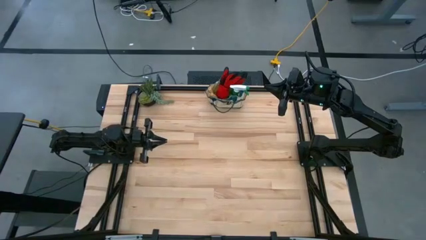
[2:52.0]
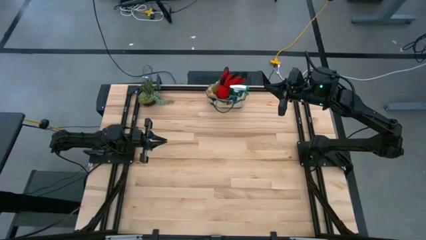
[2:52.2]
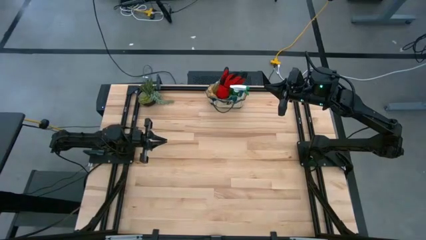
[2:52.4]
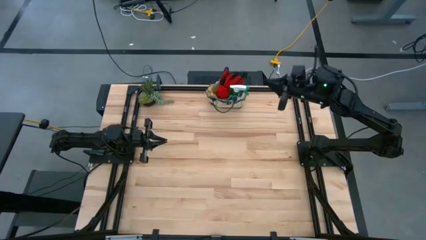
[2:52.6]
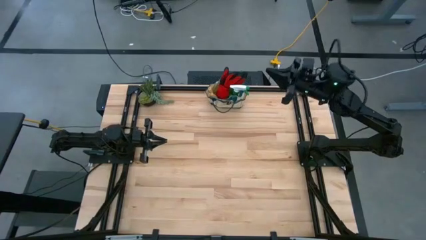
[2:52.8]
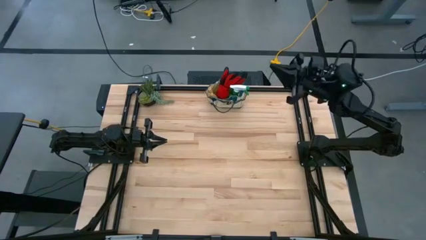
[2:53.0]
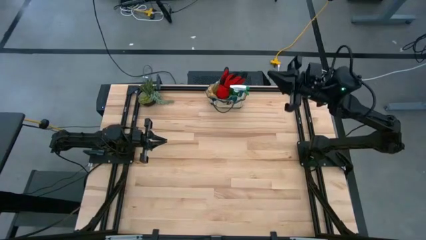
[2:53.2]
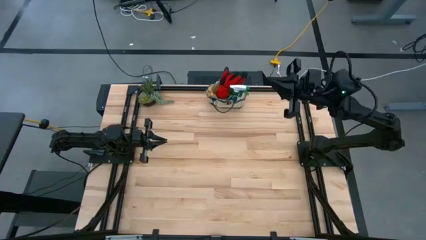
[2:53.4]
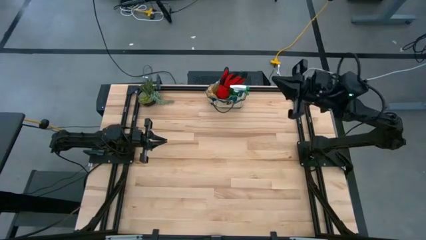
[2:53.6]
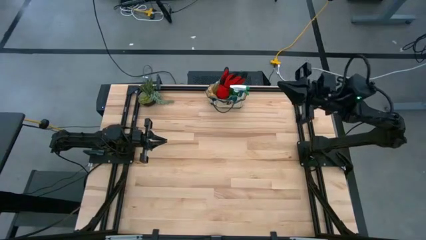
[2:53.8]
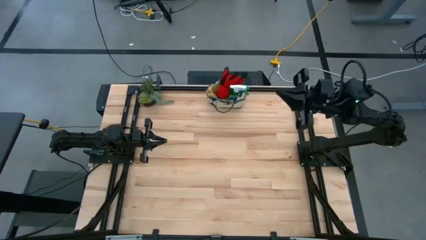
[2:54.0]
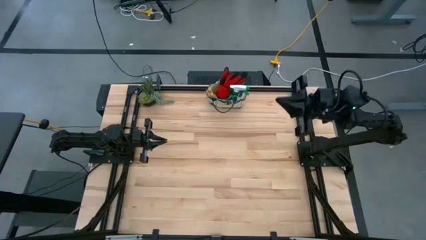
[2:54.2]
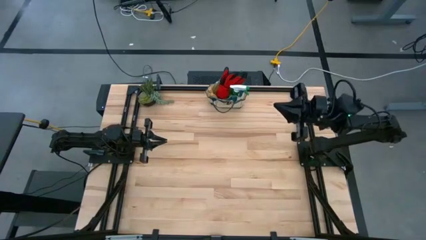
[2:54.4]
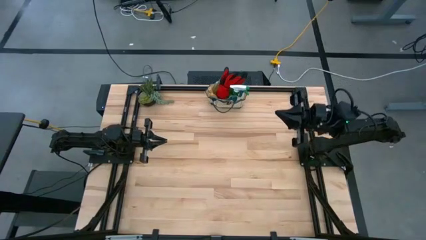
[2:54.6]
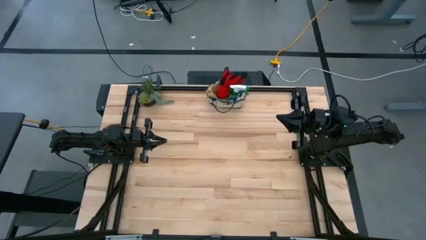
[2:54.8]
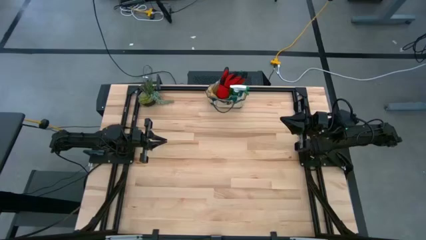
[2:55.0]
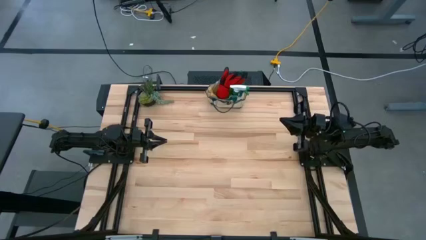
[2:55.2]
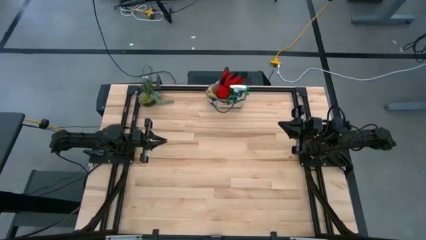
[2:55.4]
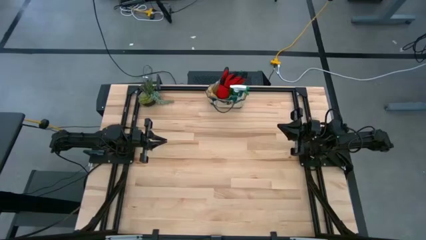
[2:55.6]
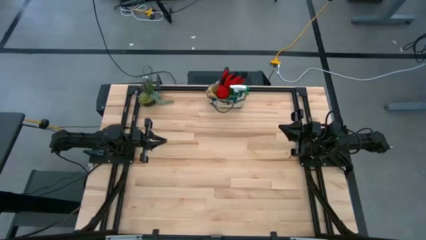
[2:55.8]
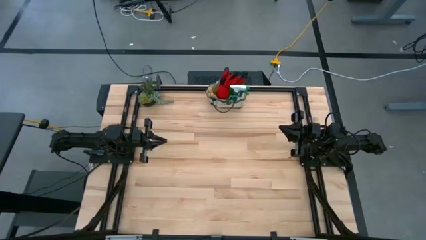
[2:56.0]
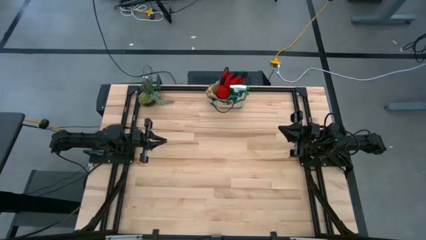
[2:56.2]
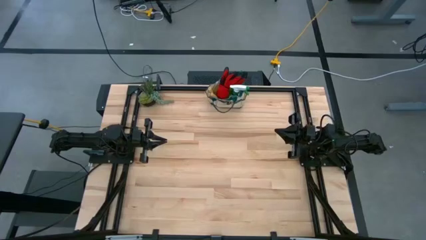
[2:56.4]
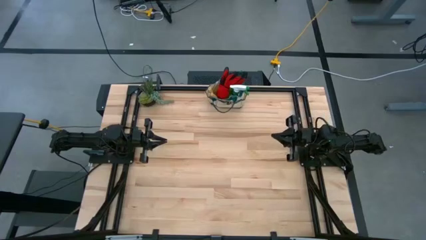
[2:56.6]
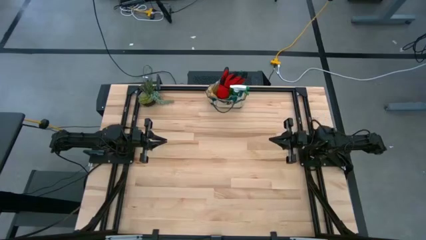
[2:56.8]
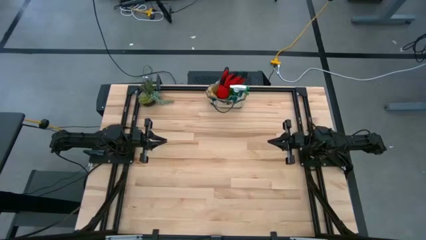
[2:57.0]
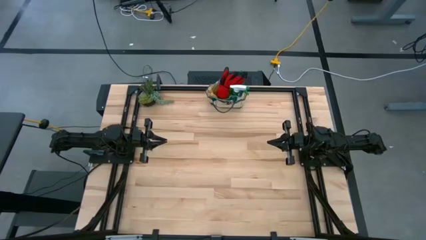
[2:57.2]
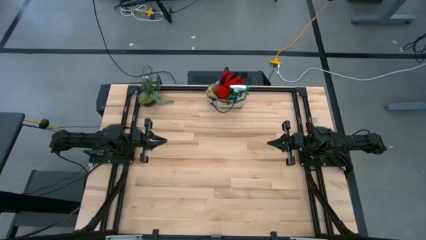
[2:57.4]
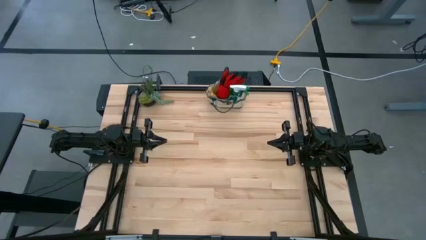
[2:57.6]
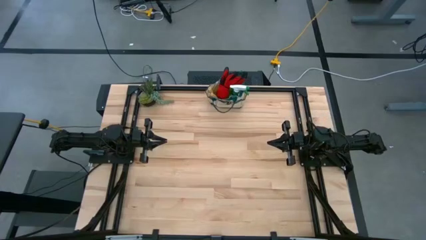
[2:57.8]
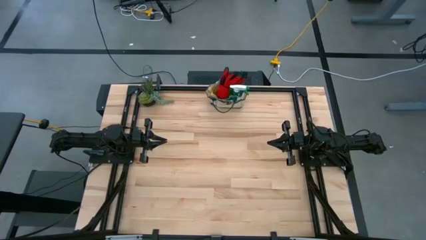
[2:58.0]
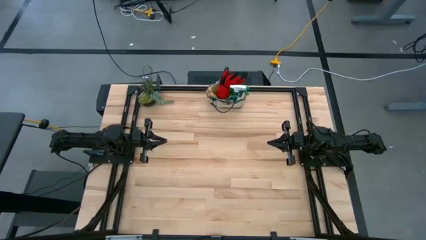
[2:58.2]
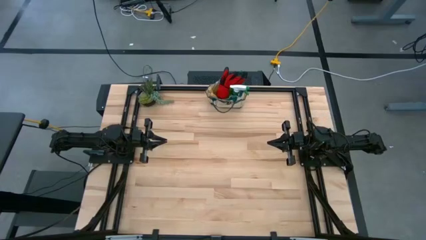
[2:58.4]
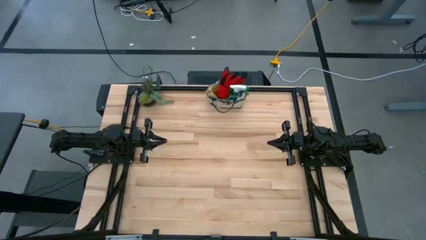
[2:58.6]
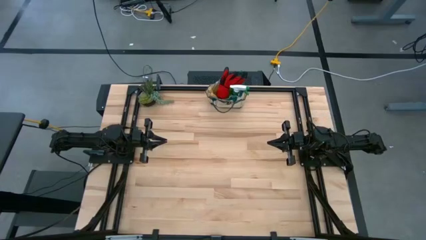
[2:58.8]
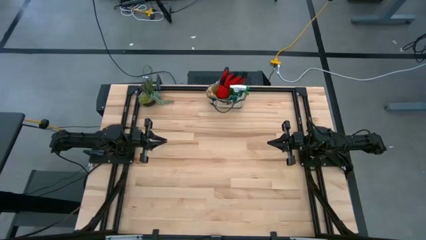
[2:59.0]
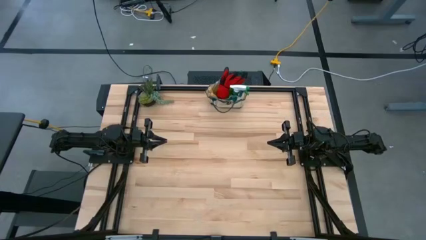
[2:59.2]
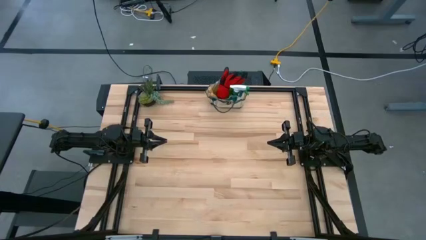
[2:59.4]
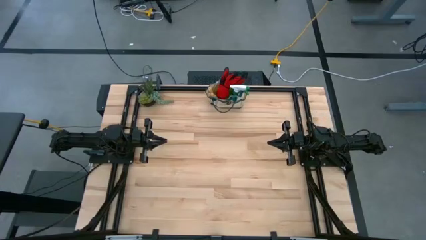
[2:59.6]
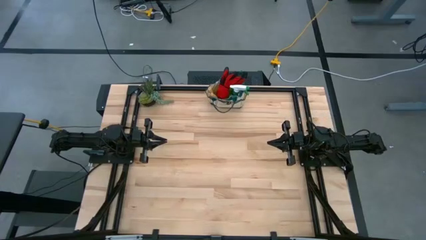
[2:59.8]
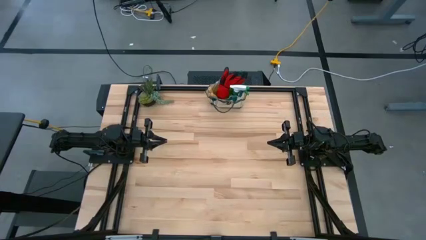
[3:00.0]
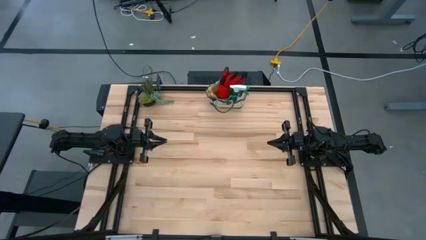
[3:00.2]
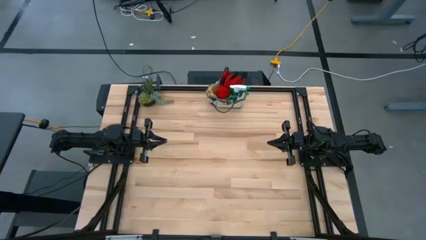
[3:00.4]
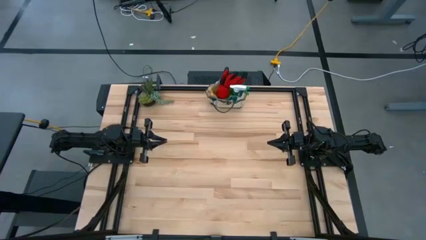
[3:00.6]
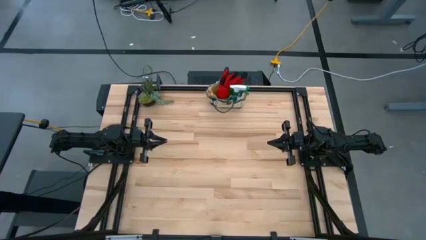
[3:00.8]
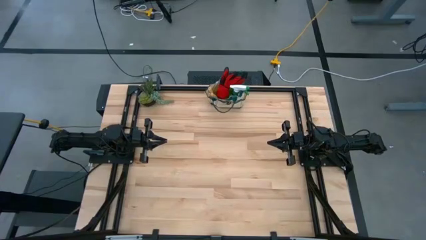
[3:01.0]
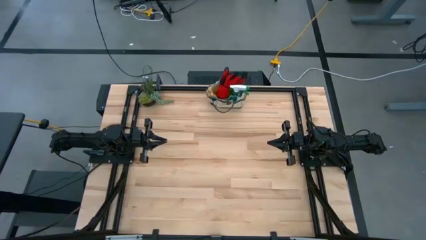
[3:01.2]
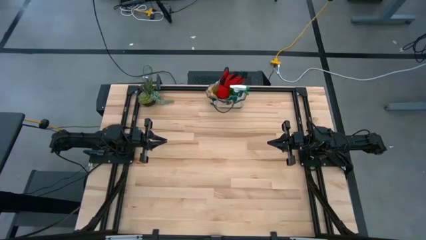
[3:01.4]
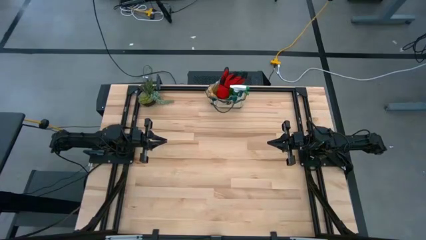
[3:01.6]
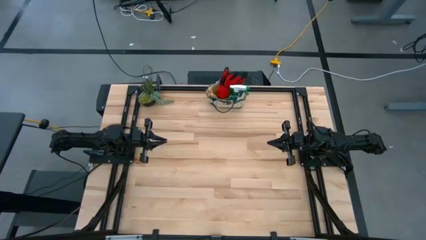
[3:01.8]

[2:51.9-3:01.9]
Task: Pick & Place Garden tools in Gardening bag
Return to Home Position

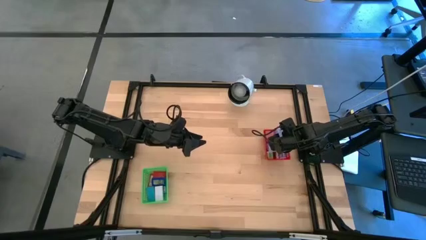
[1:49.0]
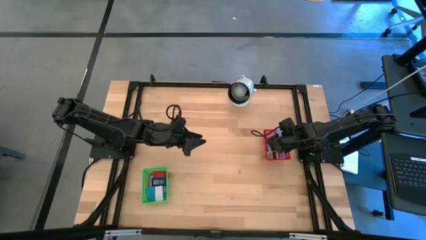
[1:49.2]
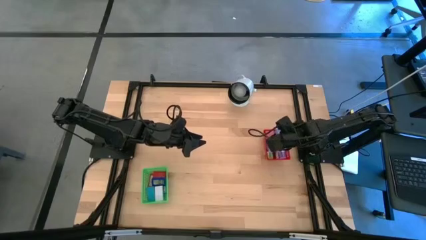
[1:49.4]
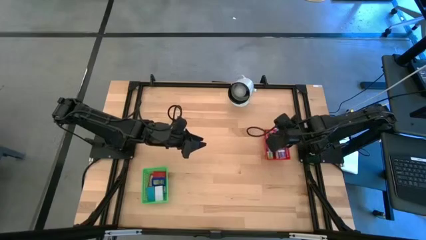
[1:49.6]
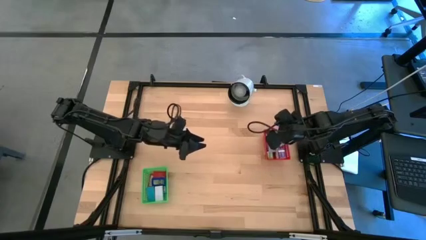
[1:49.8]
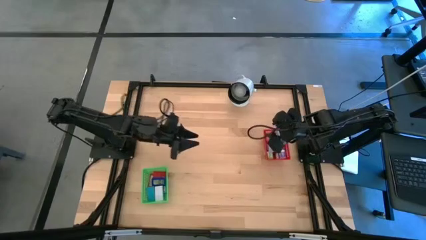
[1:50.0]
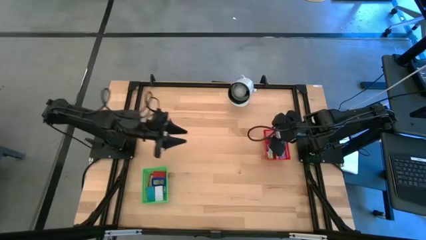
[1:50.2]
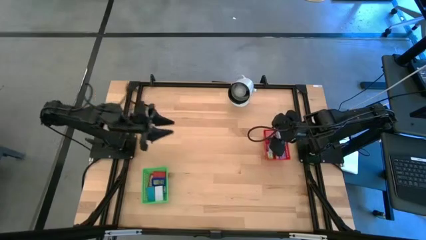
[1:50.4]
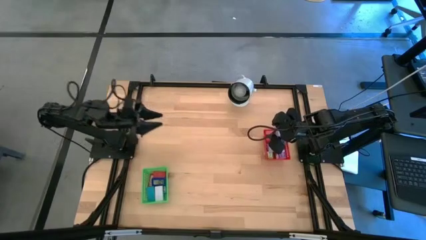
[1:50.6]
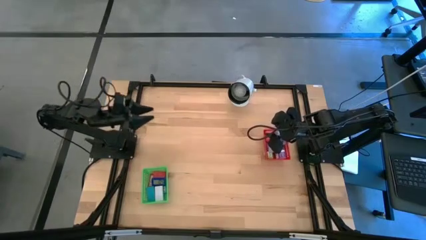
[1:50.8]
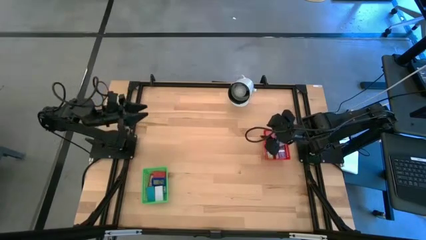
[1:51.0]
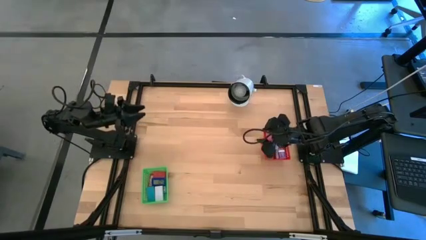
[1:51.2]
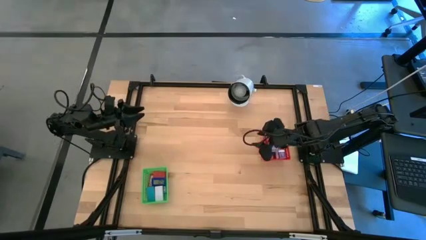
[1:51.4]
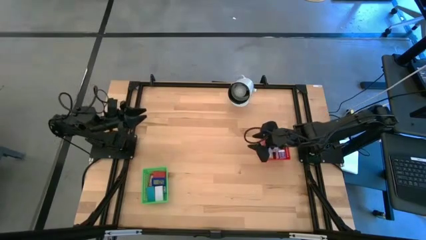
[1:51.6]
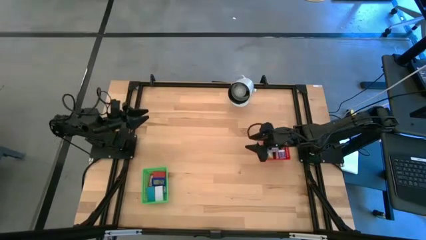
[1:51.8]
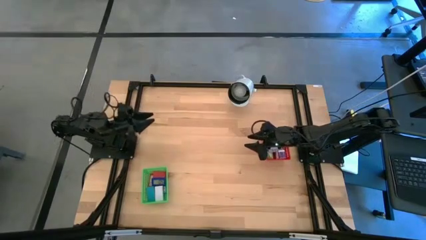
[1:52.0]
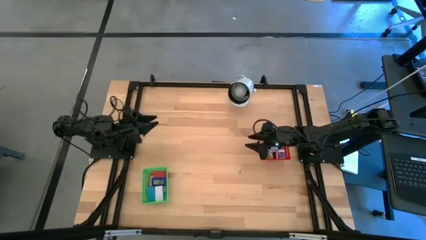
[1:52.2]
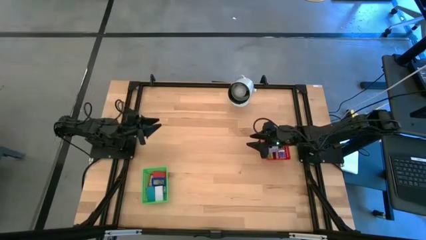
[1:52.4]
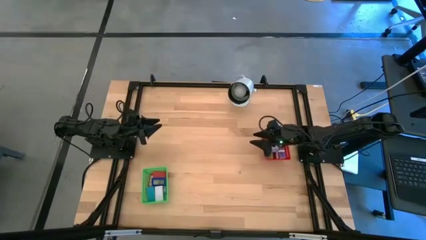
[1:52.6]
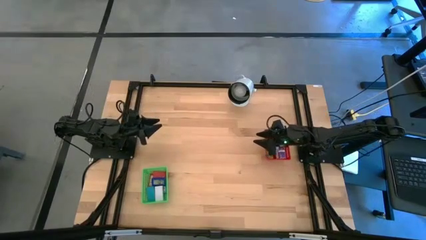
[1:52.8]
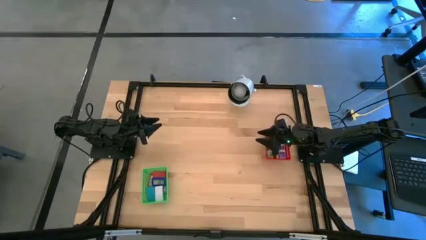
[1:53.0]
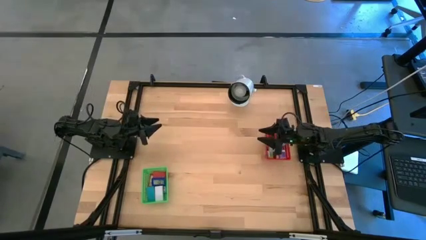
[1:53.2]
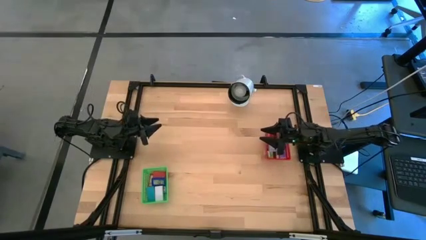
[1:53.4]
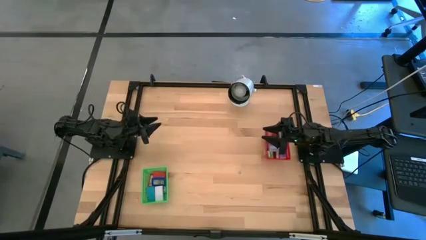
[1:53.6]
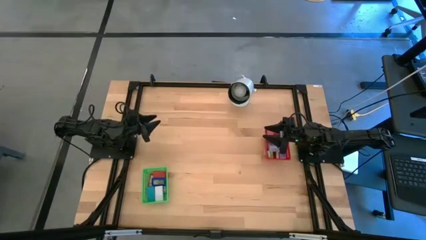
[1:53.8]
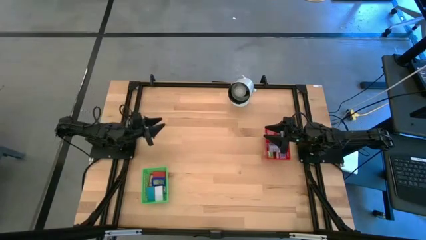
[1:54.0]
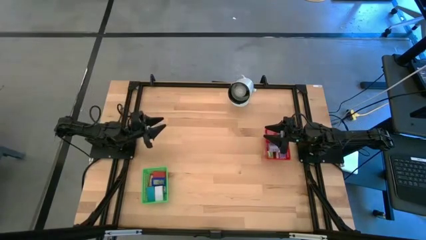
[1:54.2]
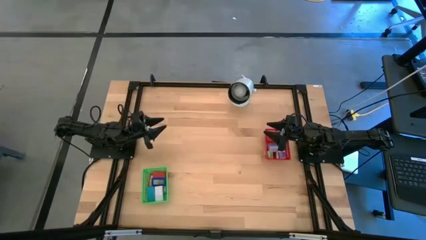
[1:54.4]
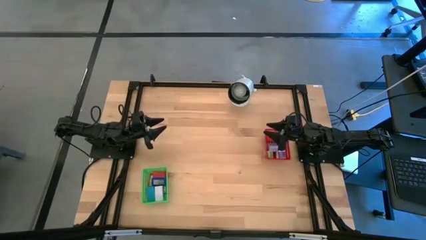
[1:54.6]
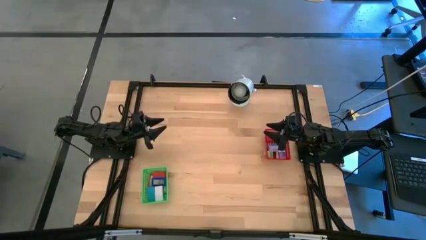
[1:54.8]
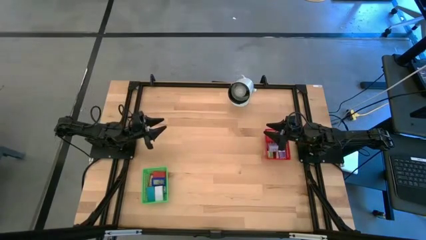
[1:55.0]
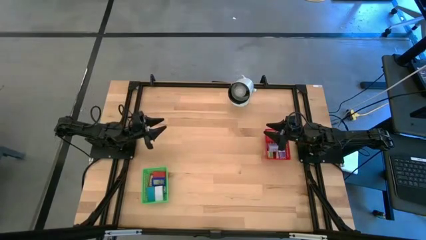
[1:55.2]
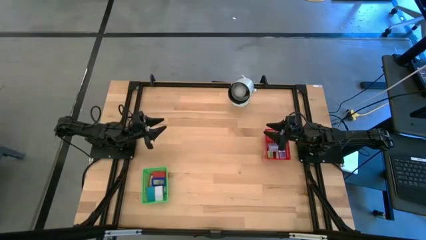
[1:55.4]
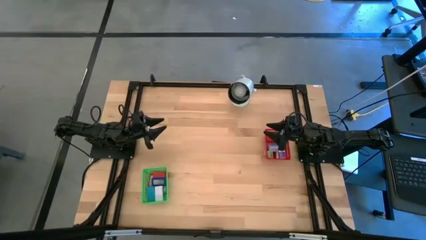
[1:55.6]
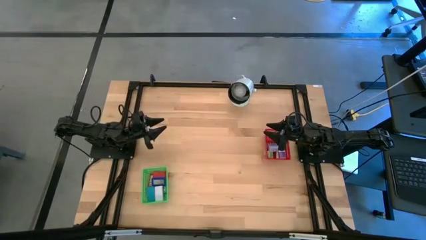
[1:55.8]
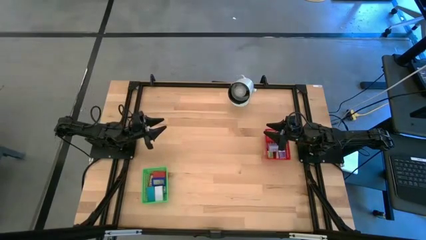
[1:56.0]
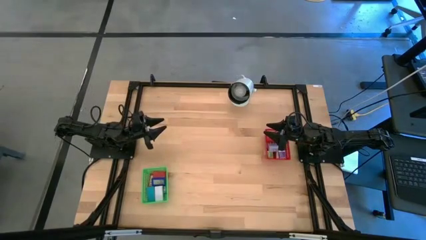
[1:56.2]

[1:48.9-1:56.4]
Task: Pick & Place Office items
Return to Home Position
